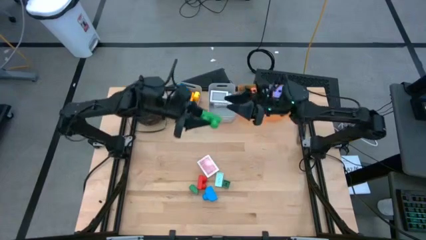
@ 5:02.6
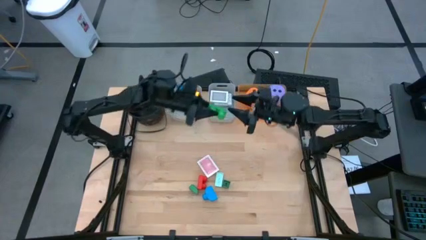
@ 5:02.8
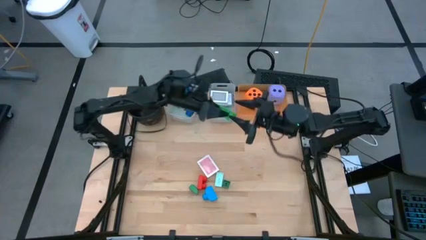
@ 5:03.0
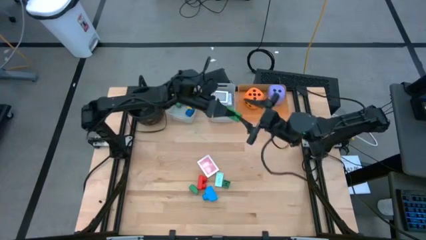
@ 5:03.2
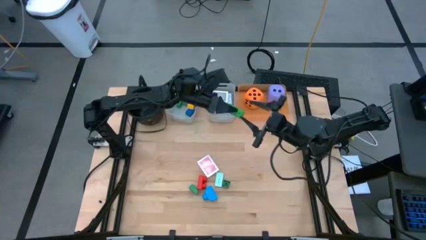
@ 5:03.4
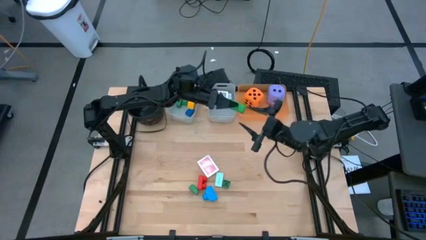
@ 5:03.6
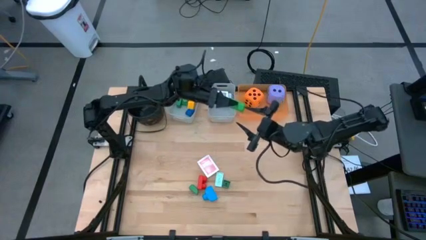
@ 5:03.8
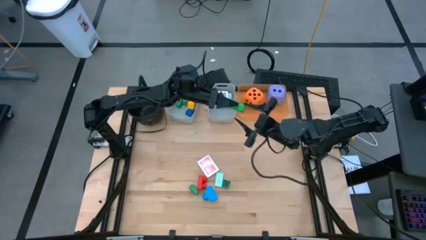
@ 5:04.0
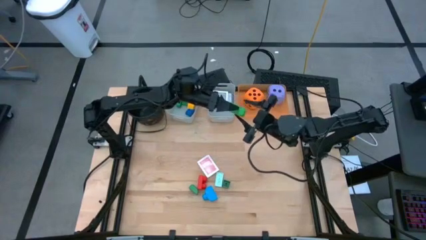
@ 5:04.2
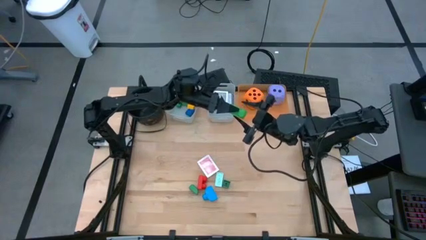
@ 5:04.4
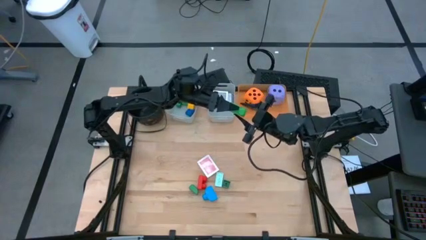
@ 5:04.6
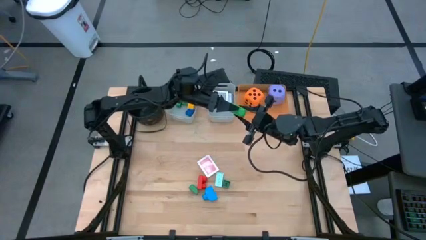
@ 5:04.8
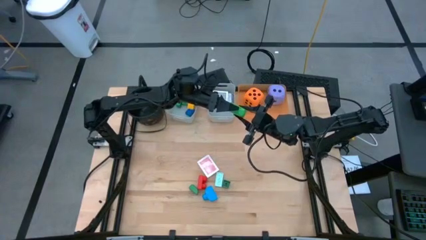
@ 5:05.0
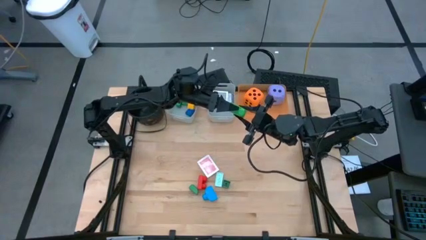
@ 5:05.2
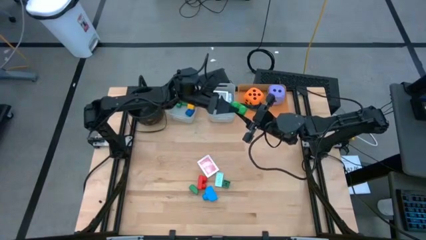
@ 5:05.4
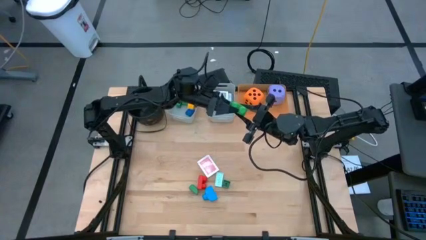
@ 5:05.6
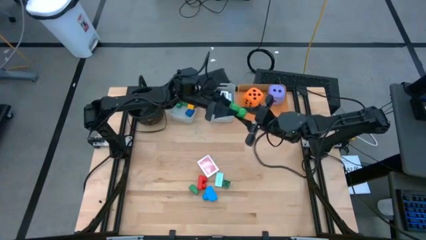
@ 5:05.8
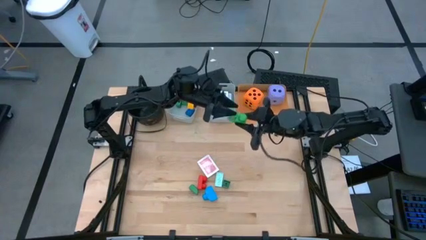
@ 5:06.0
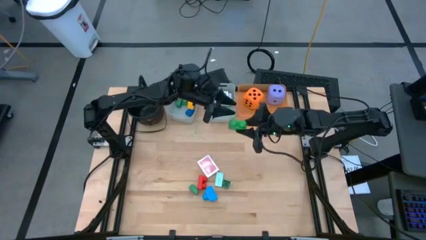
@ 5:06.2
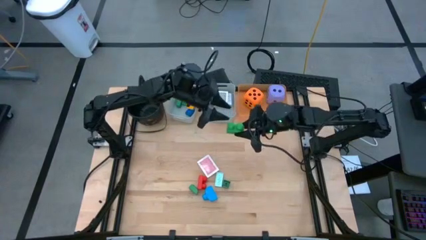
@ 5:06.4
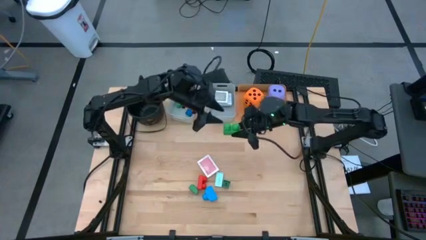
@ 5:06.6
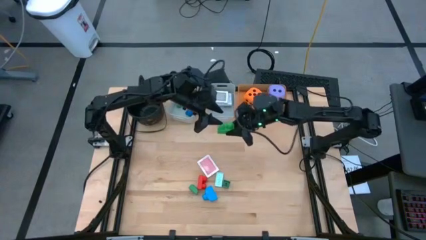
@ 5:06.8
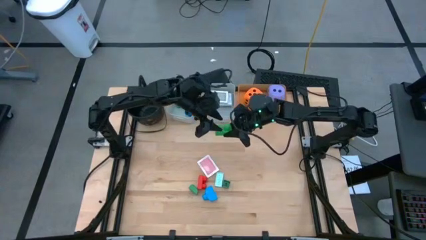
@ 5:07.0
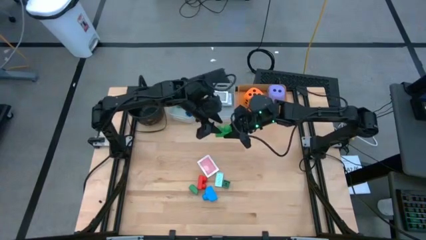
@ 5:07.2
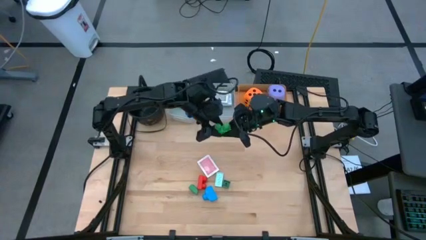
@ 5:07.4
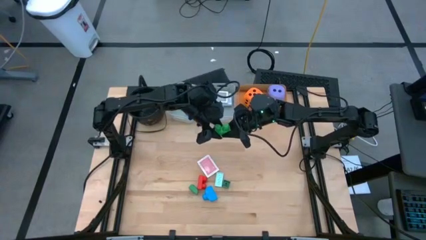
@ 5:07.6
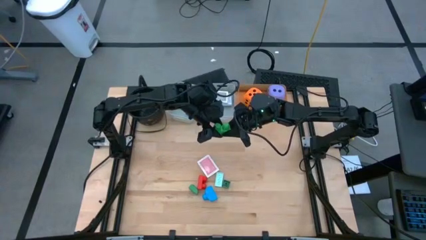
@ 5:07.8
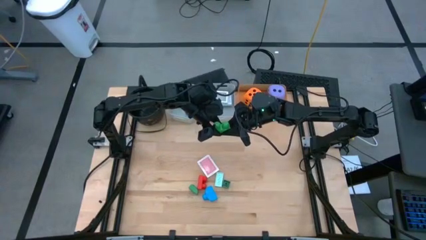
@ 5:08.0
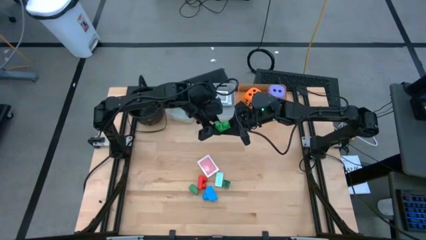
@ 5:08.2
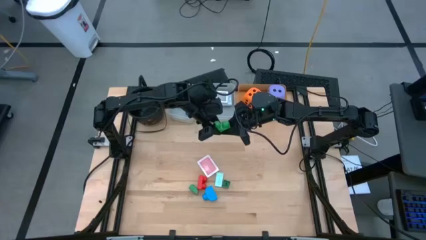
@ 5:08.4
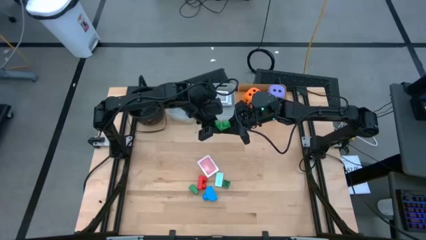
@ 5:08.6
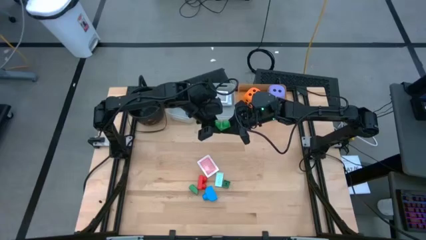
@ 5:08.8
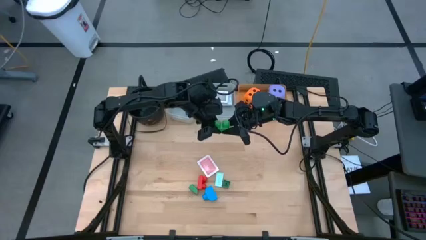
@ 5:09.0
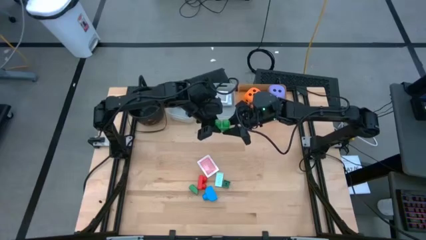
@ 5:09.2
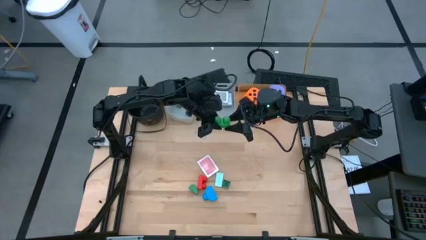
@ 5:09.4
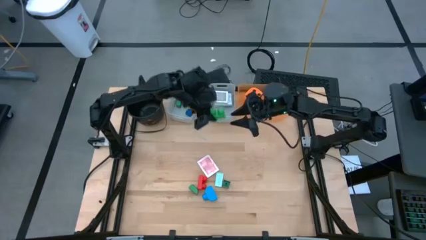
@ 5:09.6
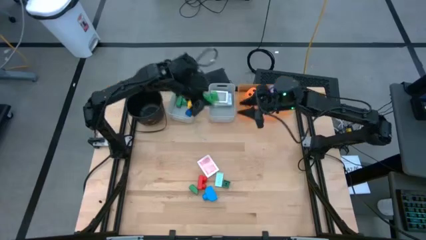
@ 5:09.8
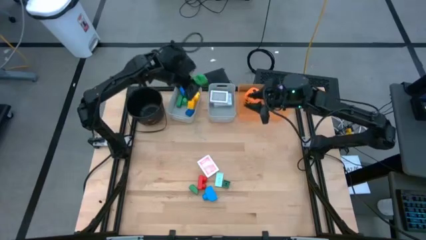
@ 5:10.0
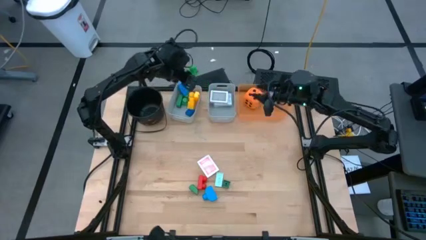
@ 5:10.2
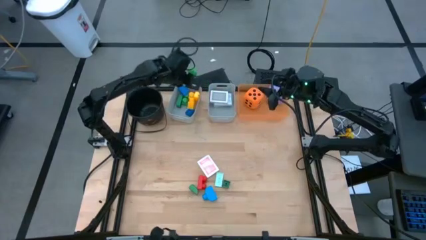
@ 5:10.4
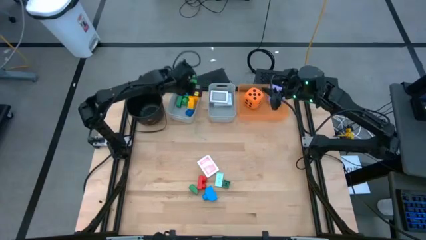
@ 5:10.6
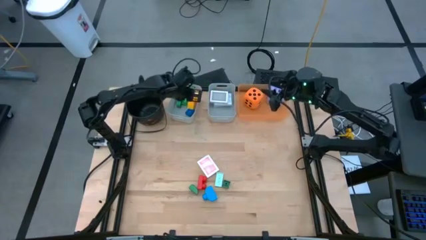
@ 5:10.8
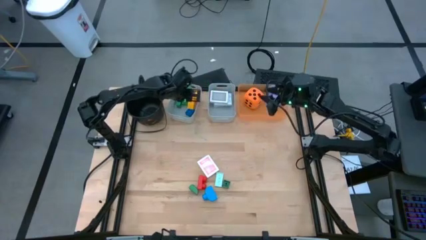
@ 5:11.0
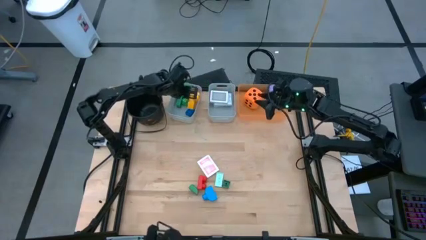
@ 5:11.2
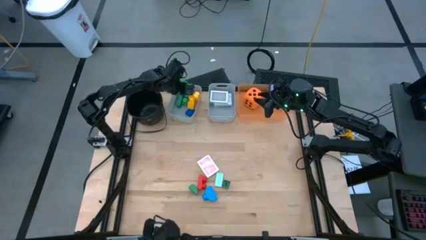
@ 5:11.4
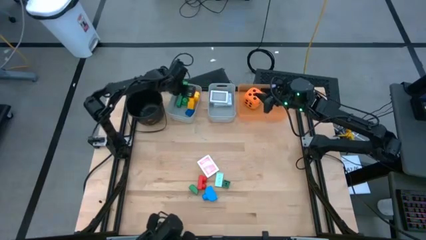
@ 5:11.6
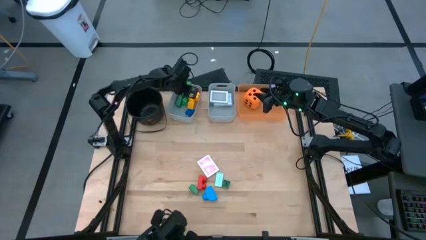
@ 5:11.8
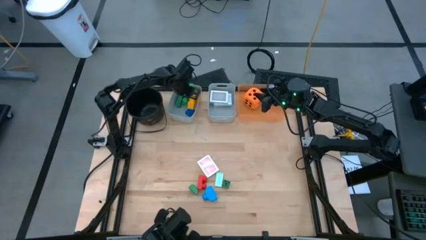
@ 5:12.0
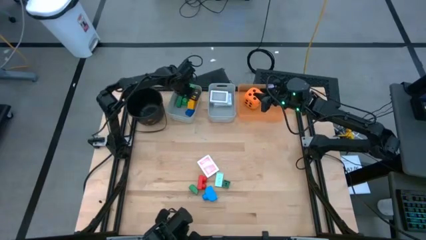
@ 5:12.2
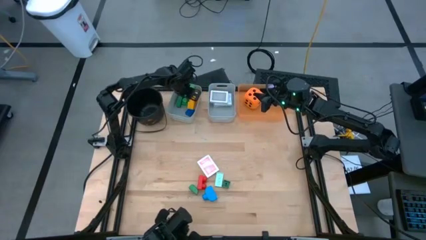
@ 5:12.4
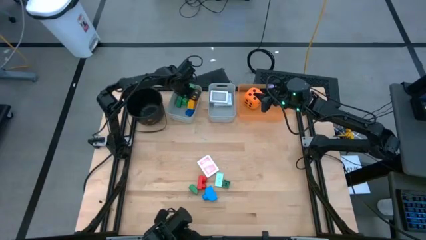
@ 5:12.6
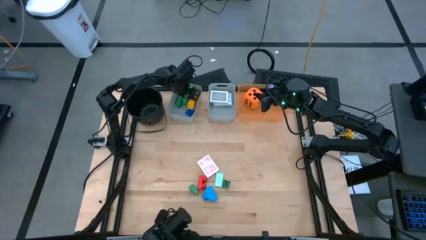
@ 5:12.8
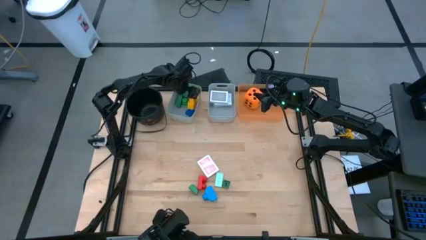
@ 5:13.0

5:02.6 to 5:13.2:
Task: Pick & Place Toys
Put the green game piece into the left gray bin
